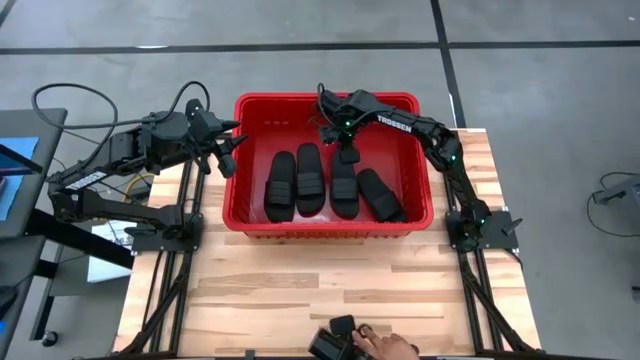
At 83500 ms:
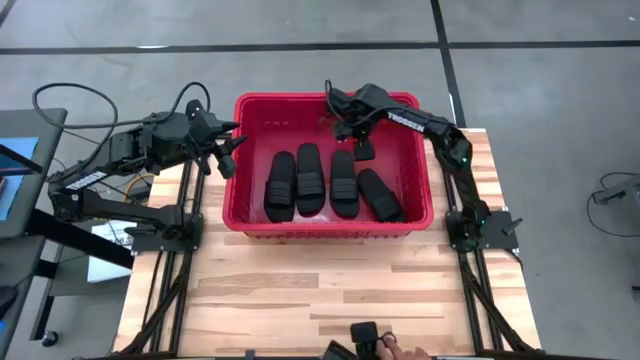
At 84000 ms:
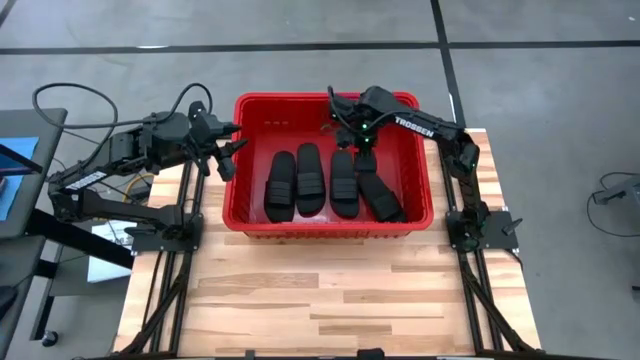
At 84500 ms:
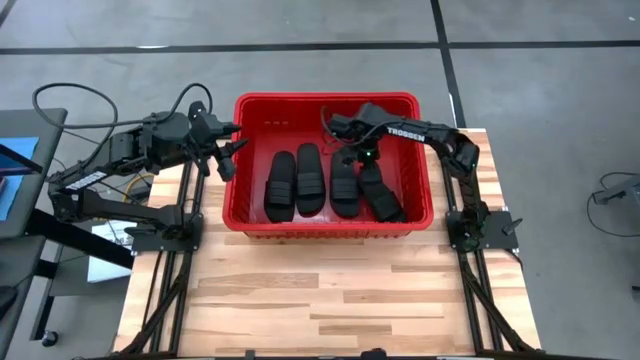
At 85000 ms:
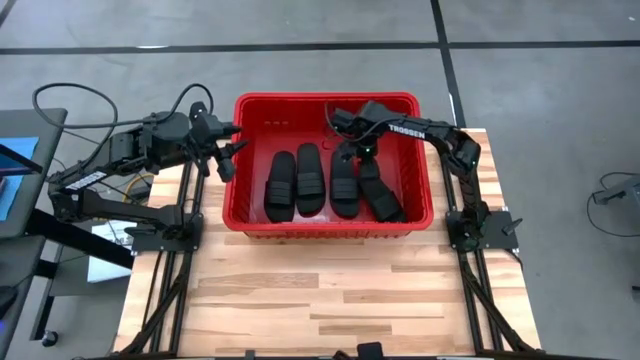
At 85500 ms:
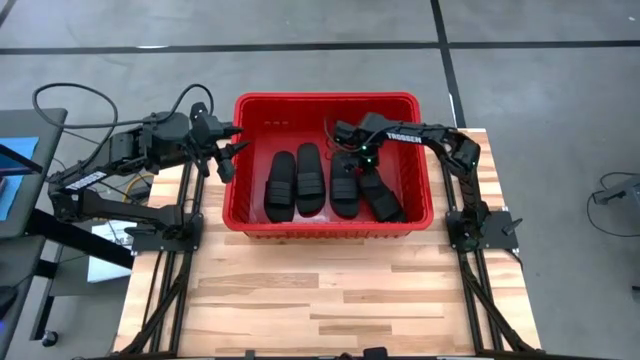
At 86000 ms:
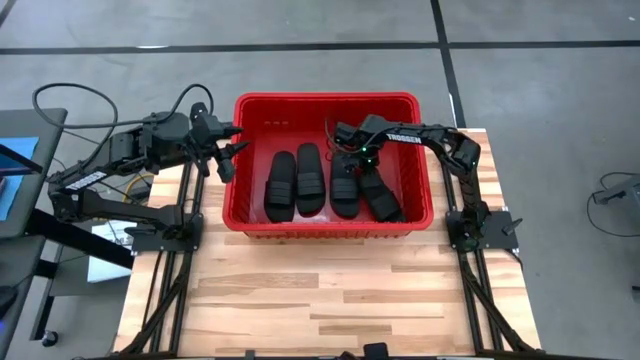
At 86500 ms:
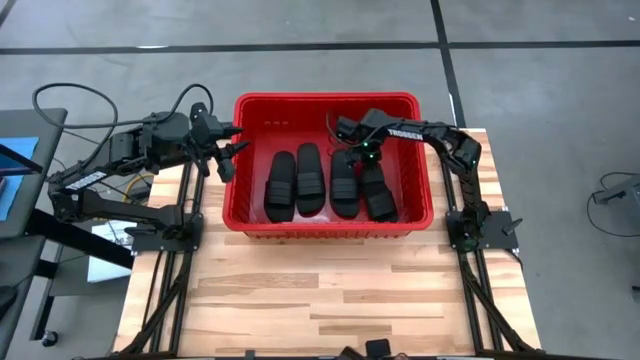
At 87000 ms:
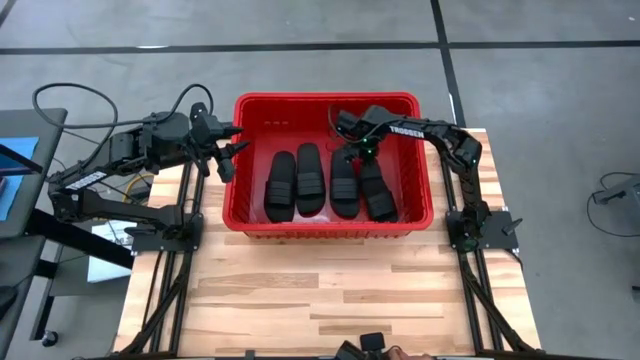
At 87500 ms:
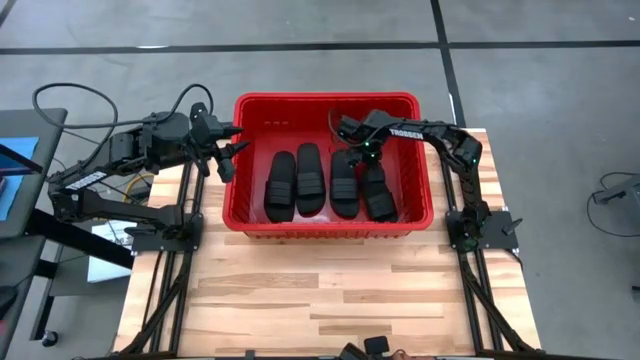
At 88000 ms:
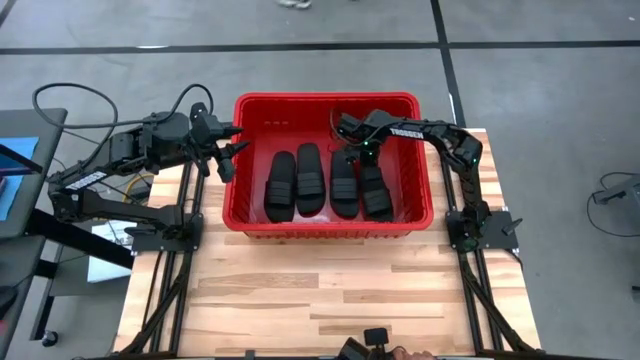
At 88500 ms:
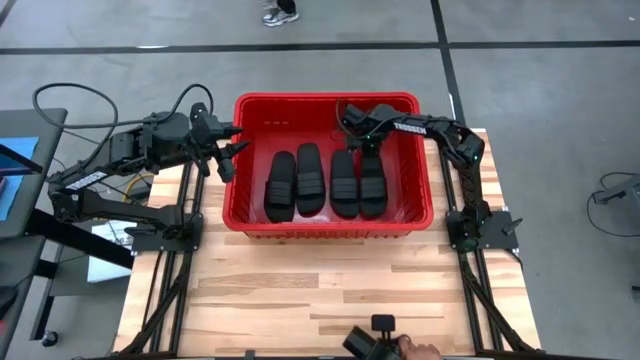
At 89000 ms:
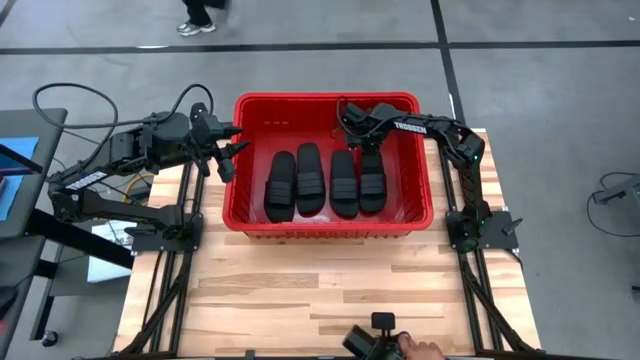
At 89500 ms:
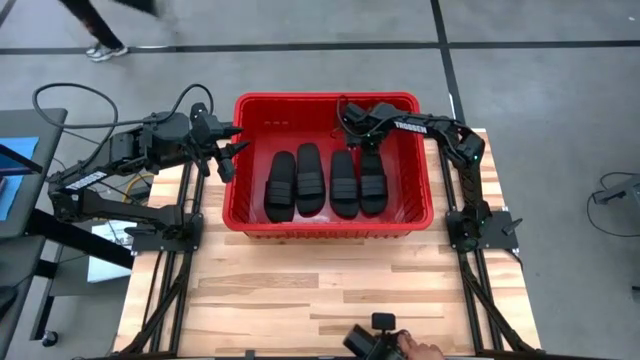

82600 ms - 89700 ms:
Task: Pick and place slides into bin
Adjust the slide inside the organizer bin

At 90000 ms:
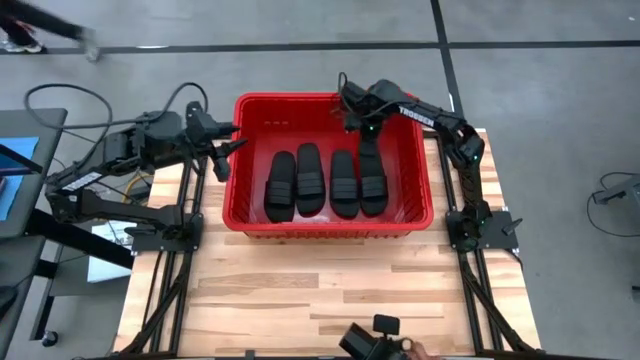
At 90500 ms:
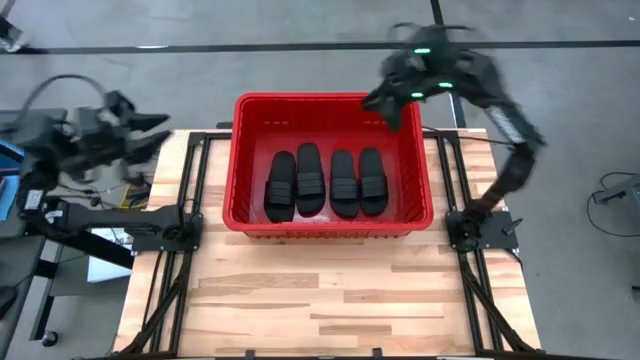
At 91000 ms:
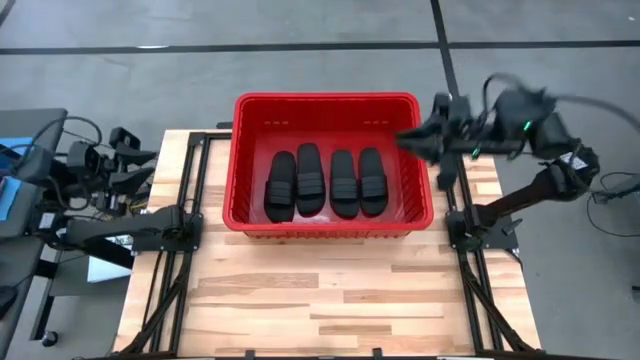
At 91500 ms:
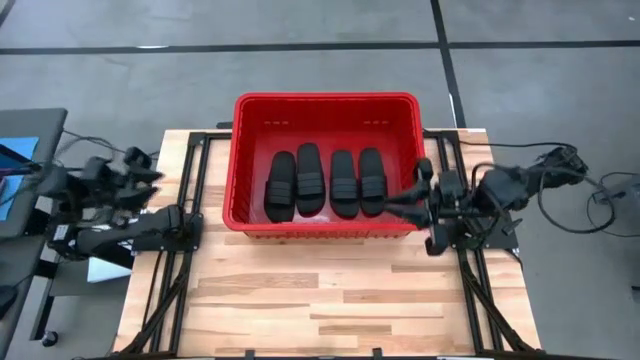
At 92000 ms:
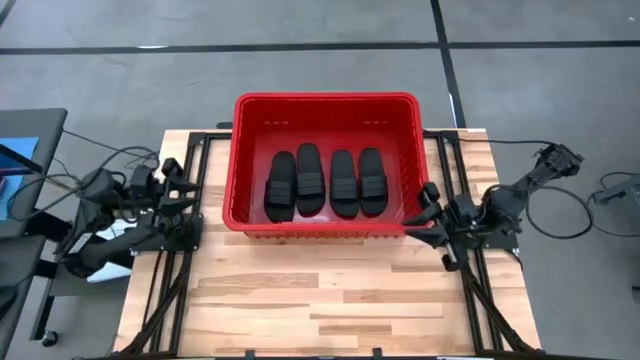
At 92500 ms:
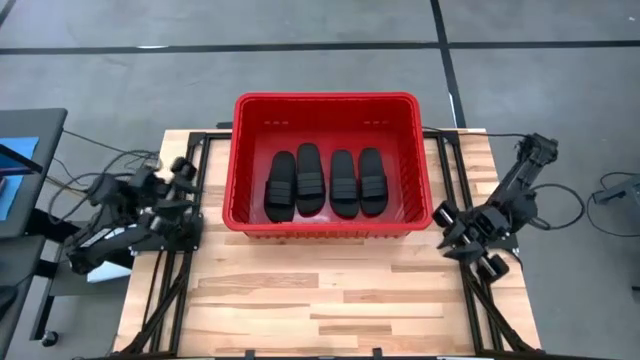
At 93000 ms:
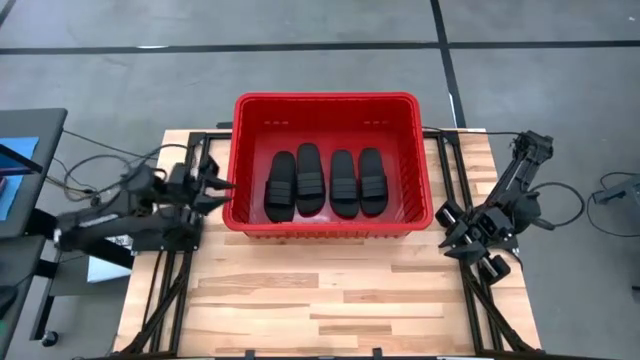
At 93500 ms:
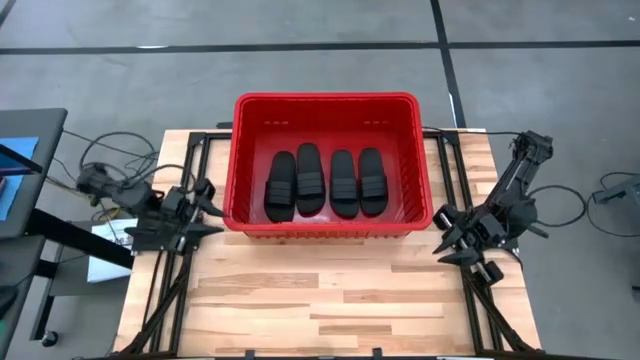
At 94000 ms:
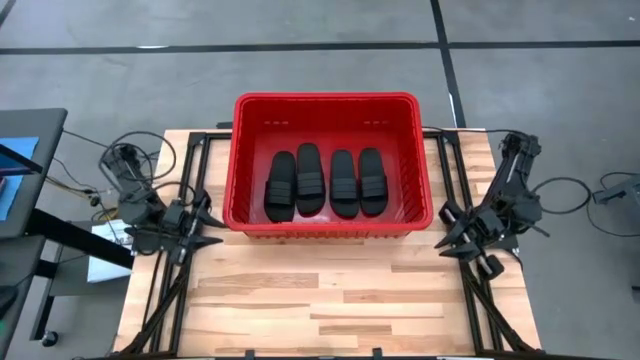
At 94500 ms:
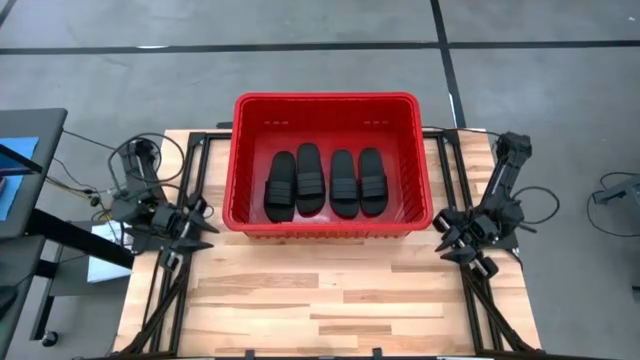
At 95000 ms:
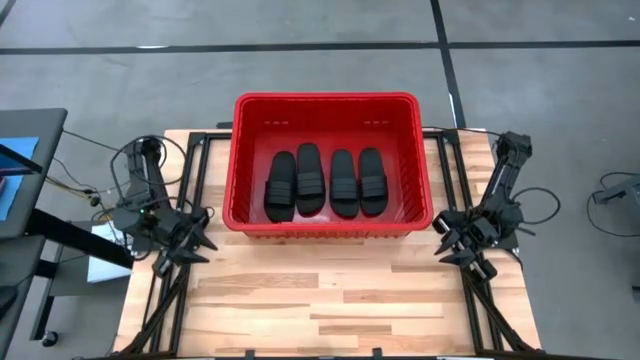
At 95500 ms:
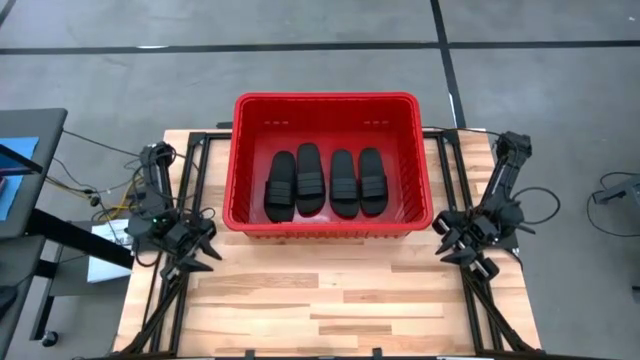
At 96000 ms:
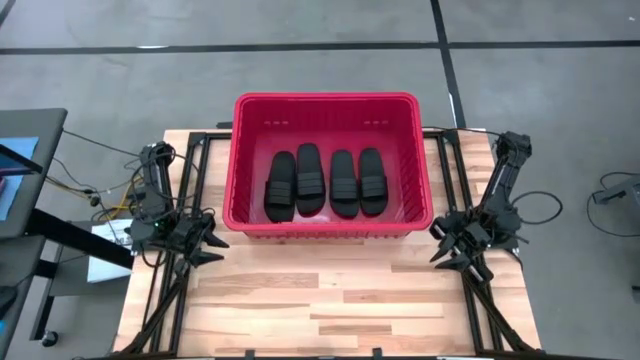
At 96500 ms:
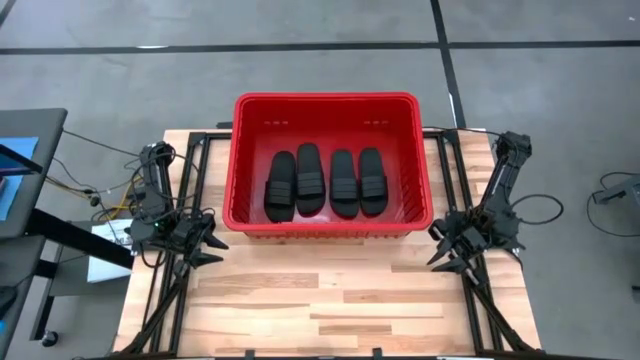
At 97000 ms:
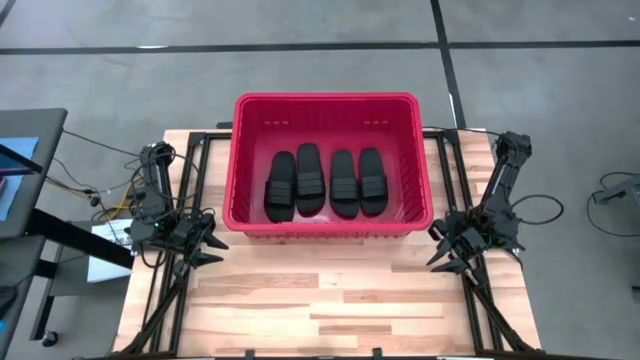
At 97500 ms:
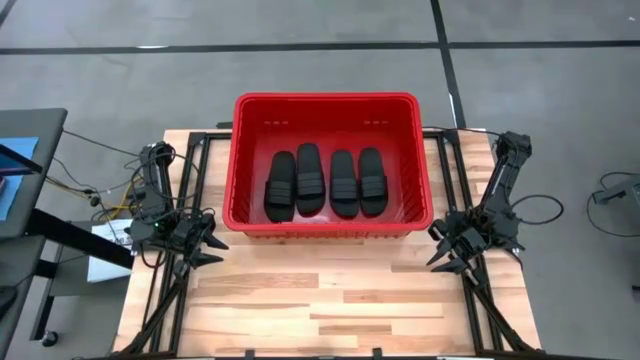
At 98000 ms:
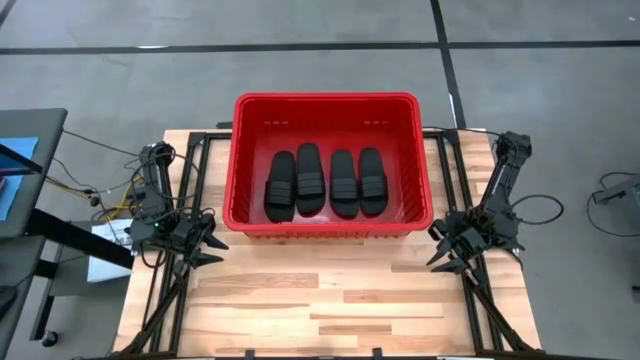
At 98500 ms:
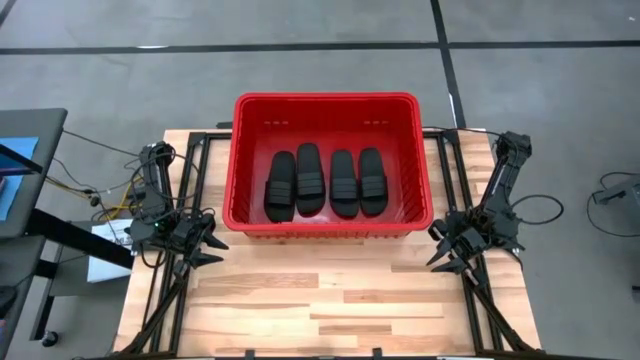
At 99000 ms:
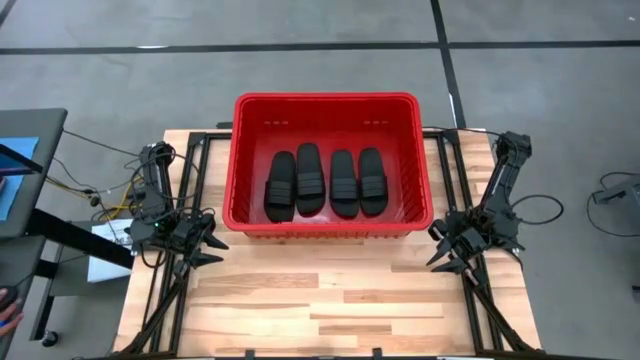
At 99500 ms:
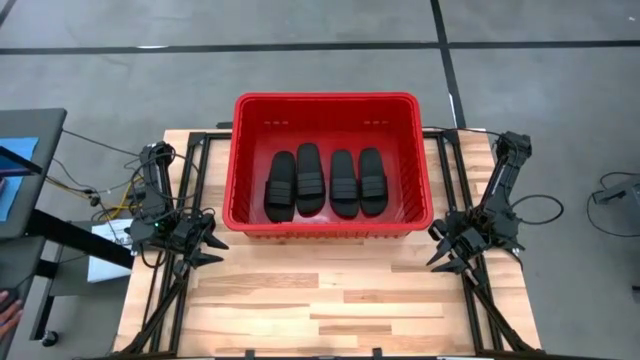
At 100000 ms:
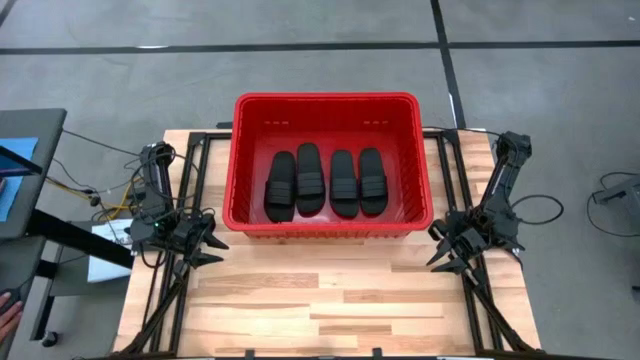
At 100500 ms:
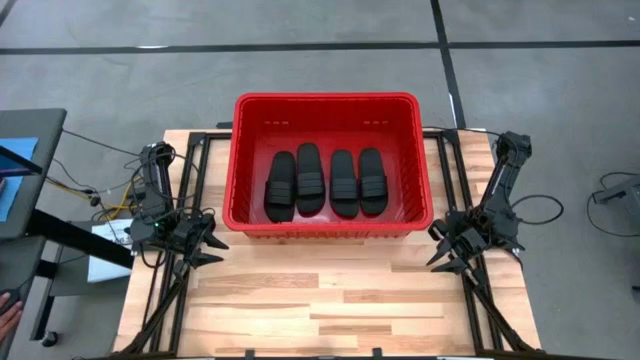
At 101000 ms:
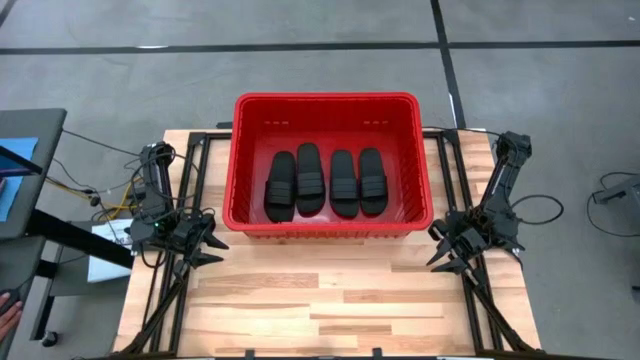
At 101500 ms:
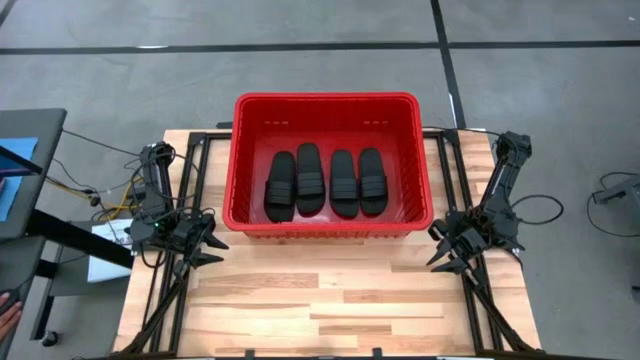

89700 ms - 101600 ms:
Return to Home Position

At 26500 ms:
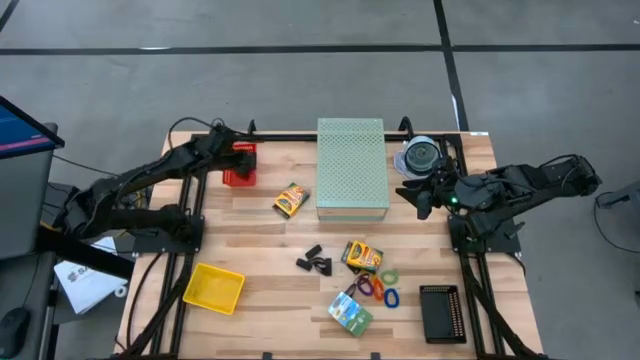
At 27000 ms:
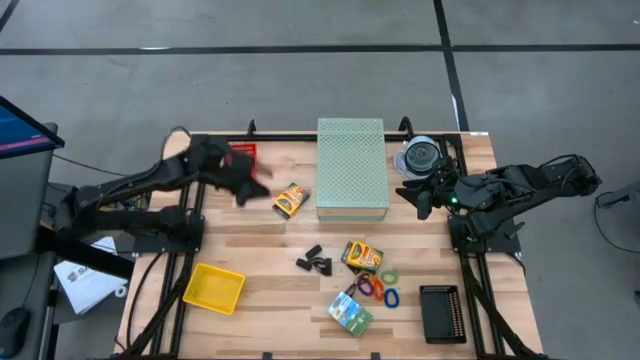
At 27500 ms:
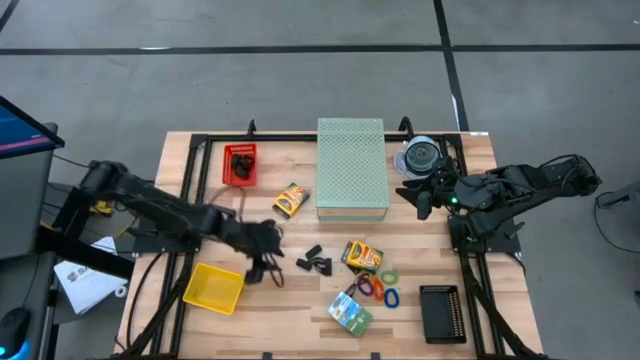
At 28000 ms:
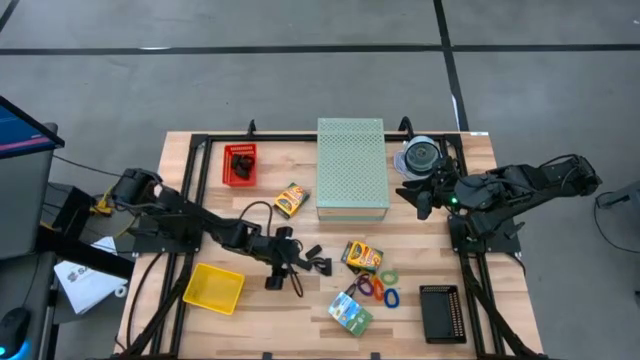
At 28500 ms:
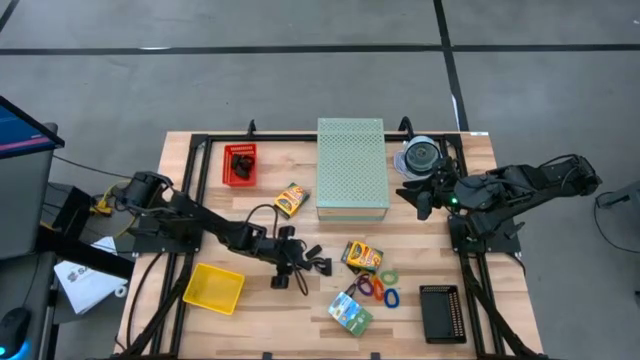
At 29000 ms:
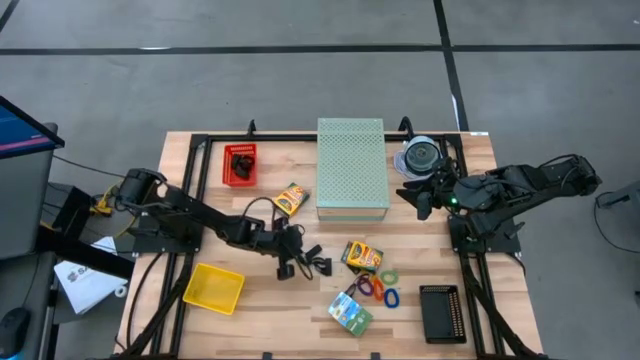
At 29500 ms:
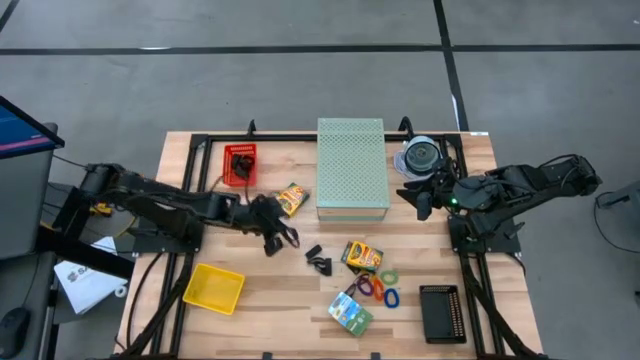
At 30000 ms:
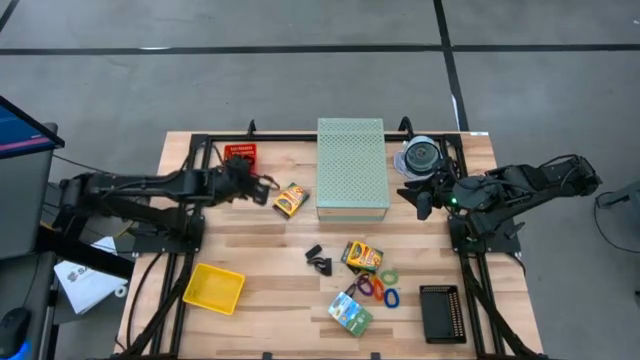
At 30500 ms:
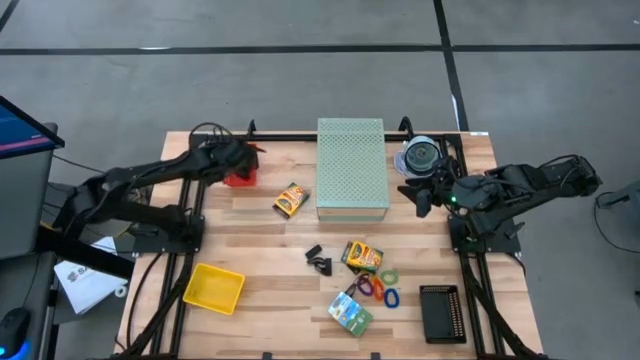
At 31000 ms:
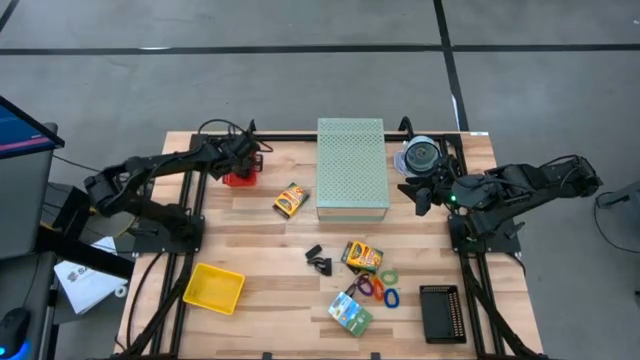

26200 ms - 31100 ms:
Task: Pick & Place Office Desk Supplies
Put the black rubber band into the red bin
